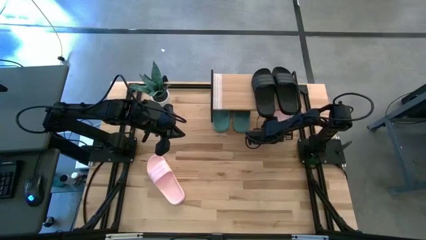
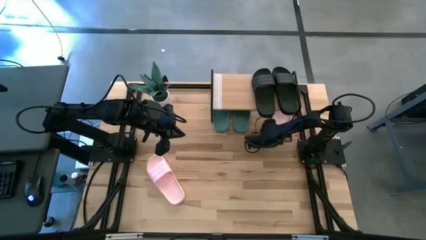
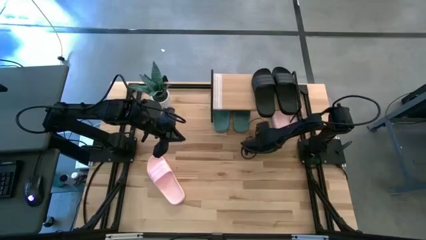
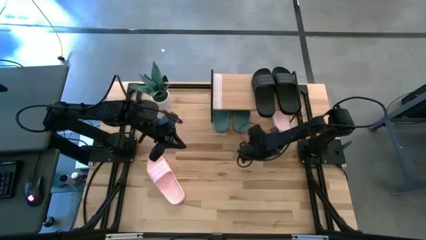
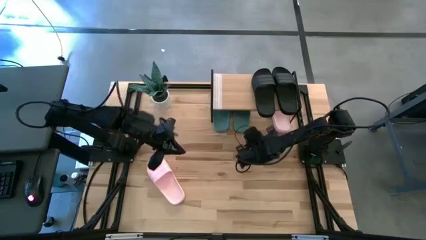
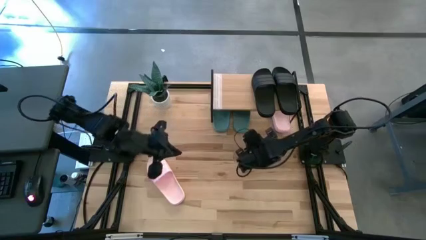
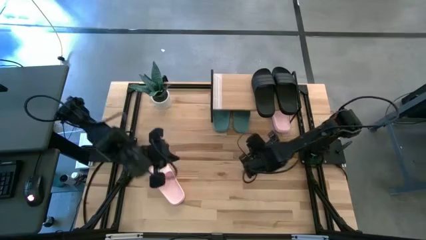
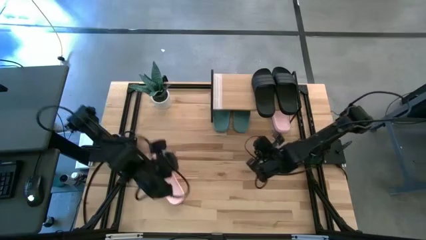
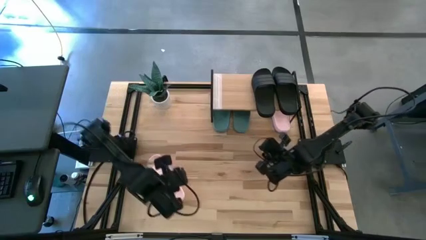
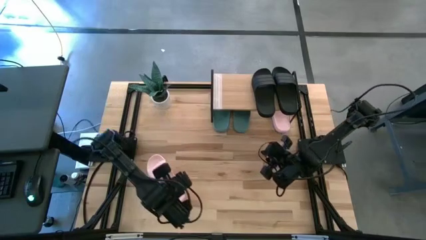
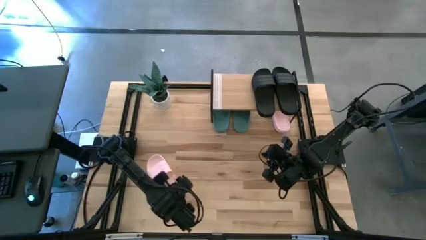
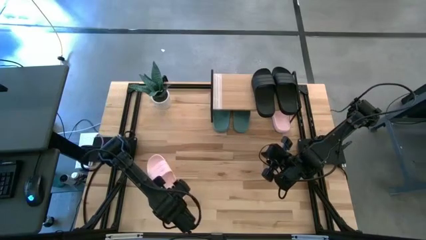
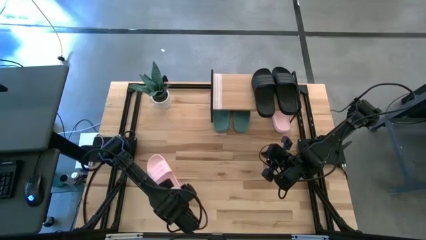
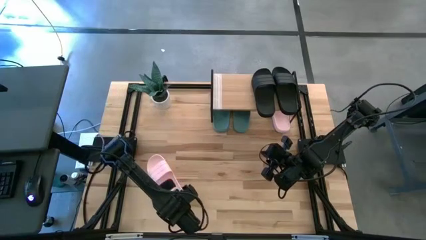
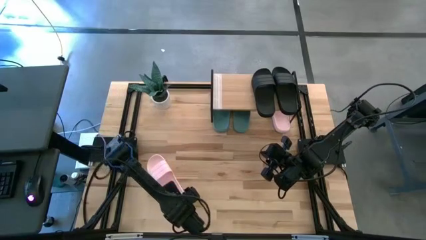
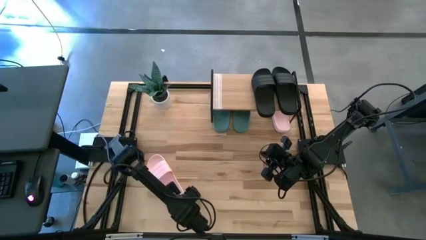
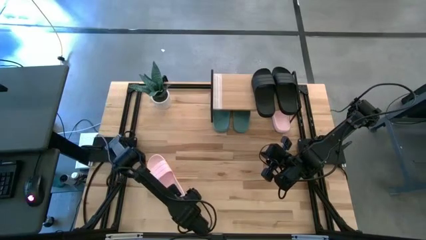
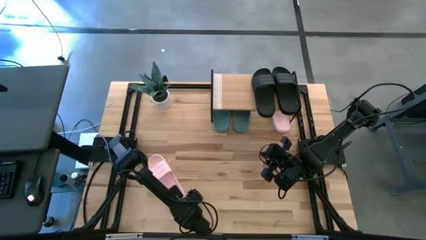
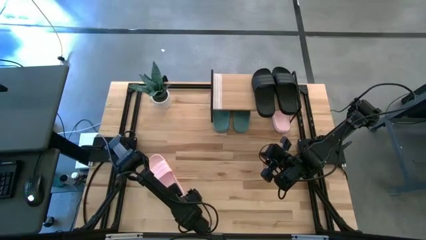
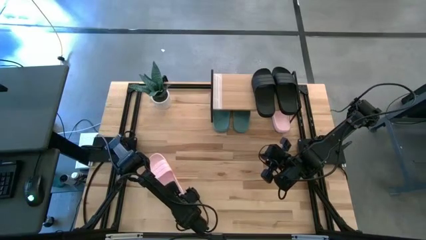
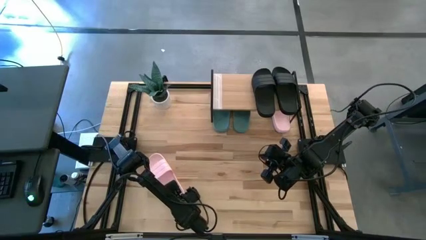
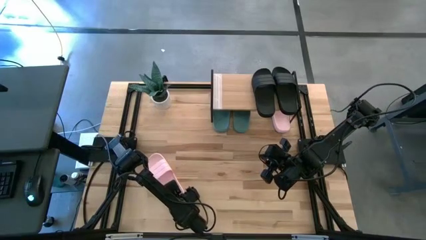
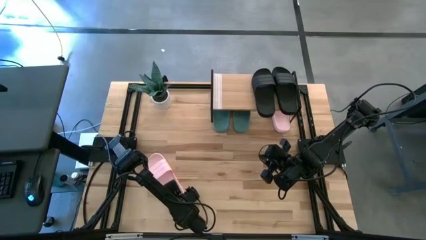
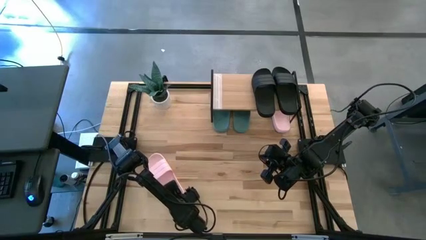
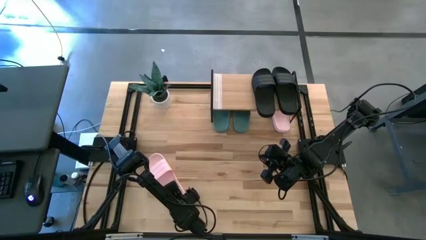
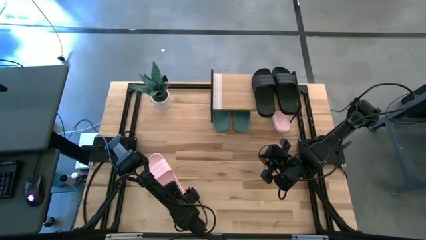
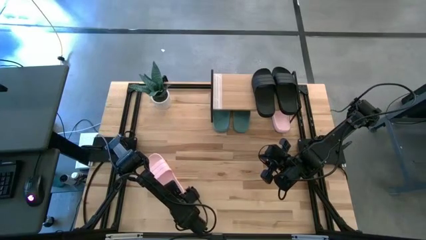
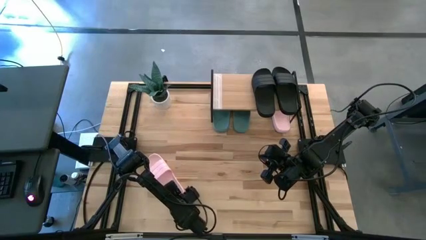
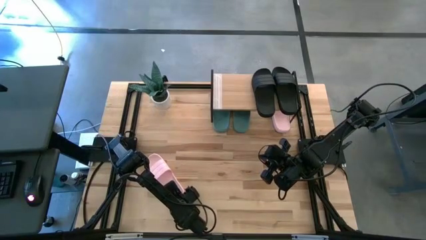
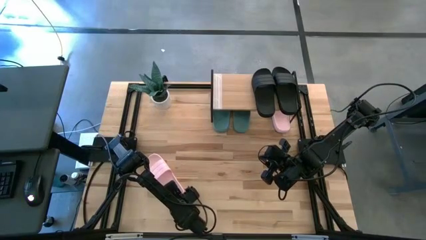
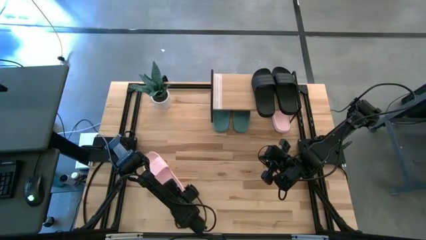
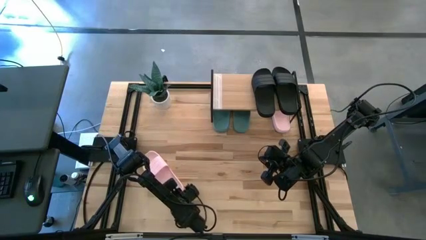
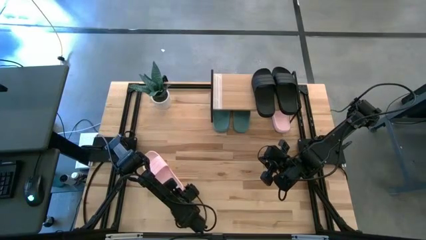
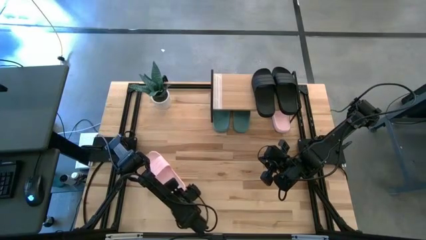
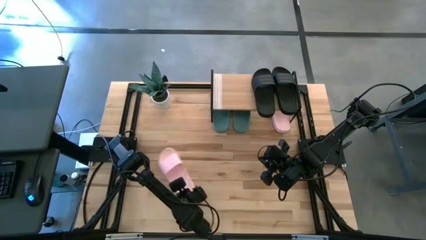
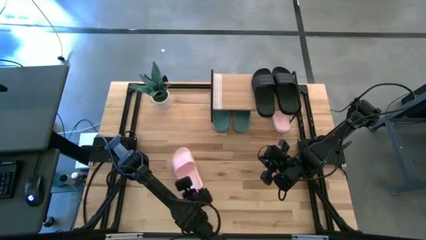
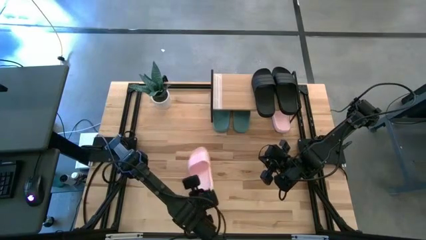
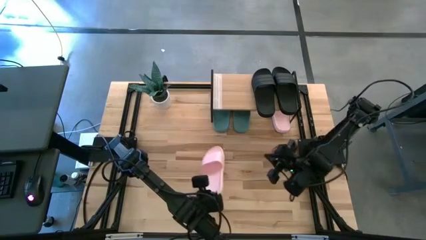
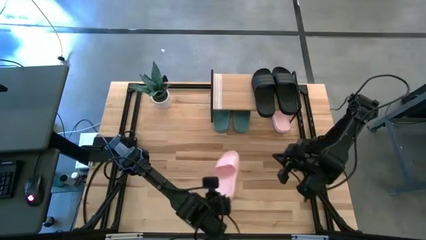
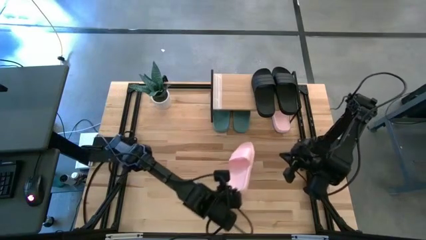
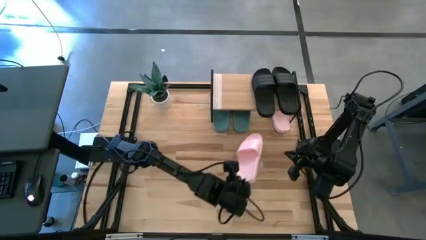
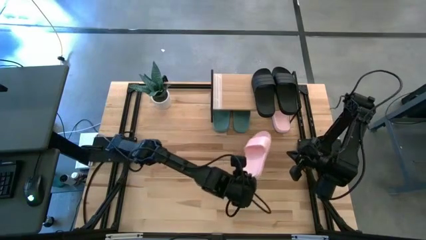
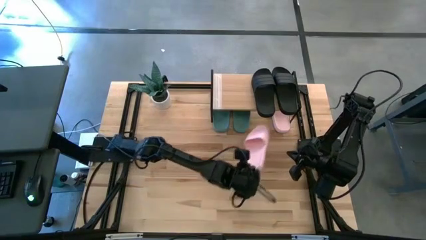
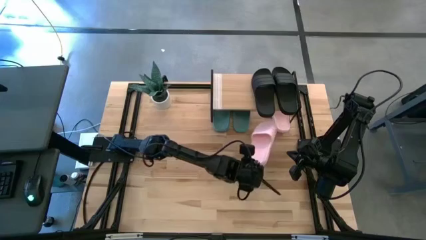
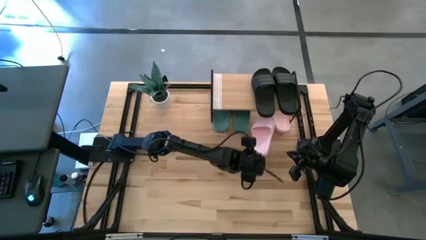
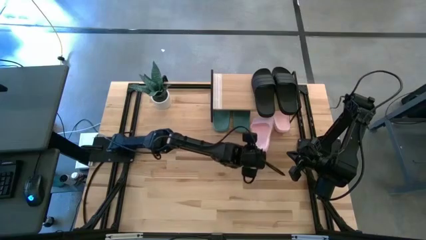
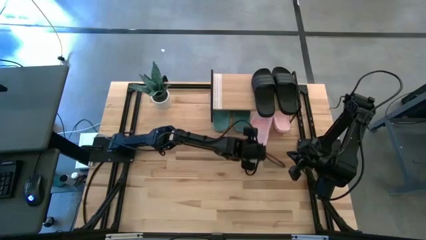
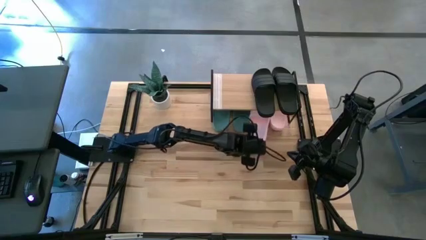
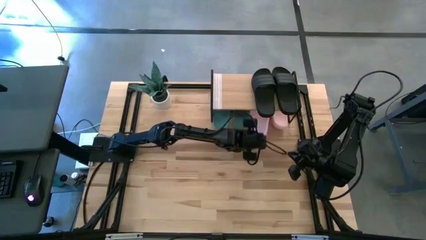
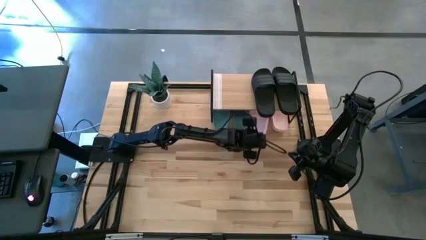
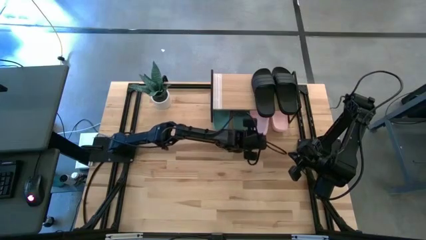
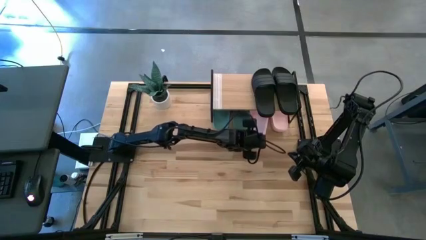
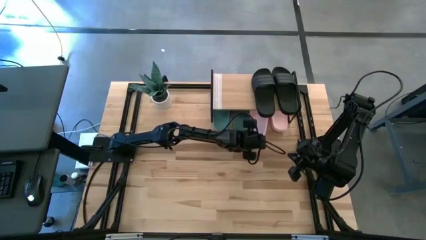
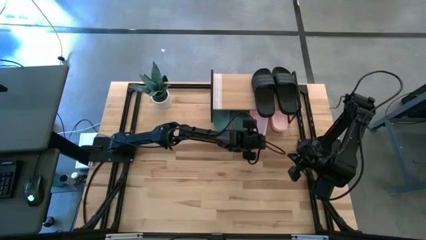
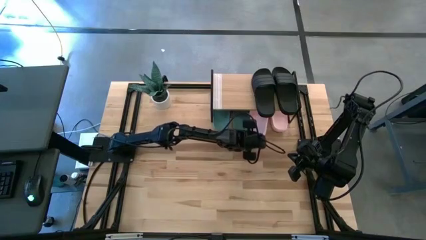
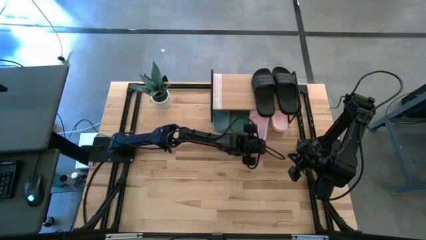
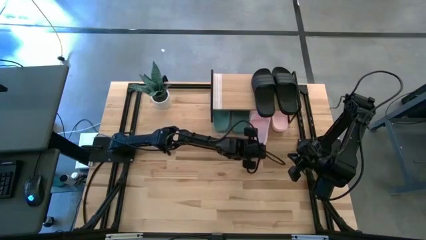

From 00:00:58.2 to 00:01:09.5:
Task: Pick and place slides into the shelf
Move the pink slipper under the shelf

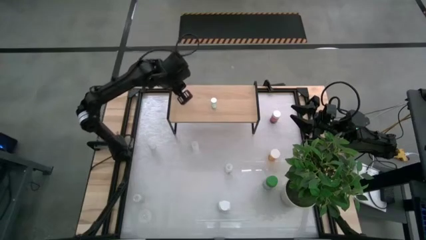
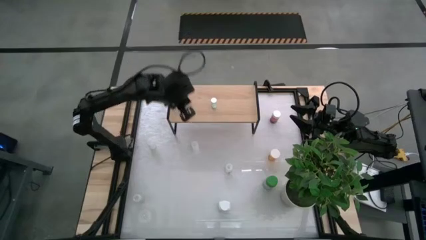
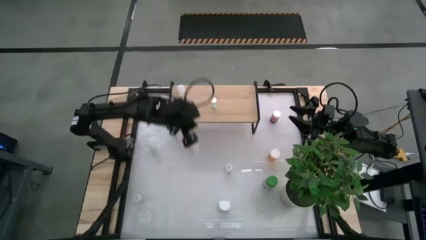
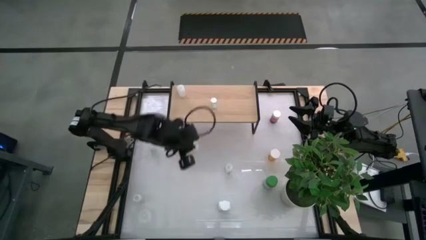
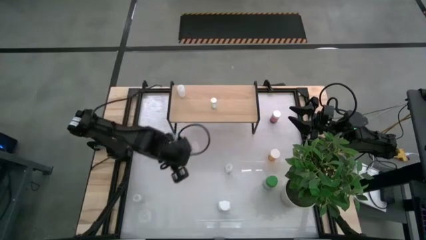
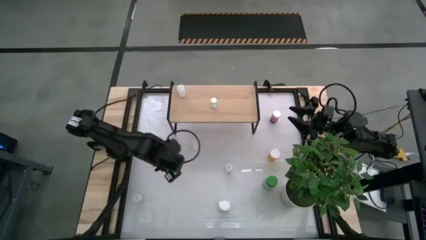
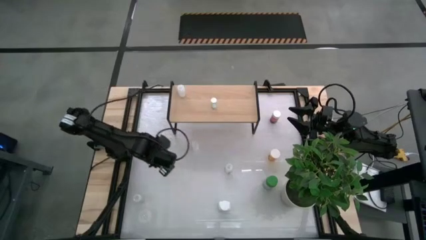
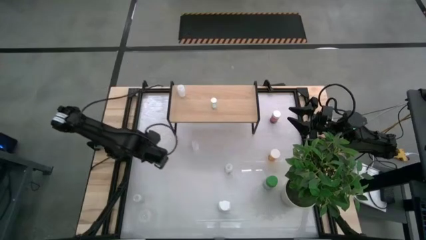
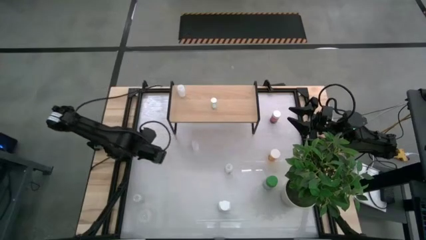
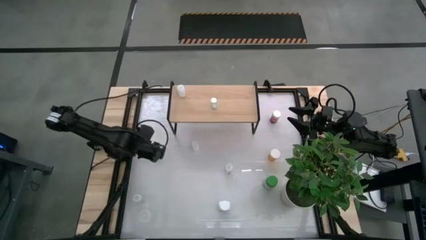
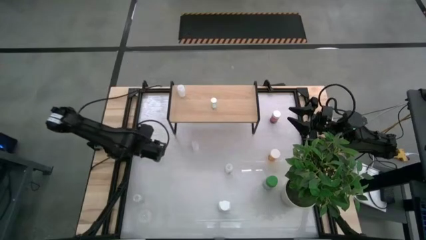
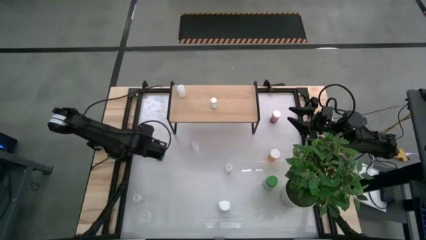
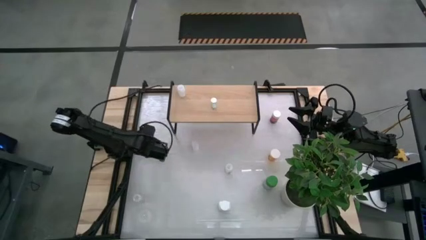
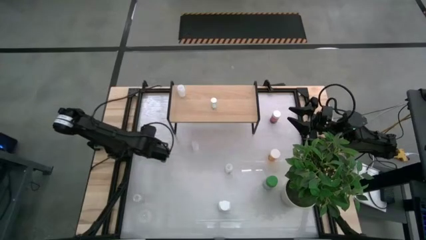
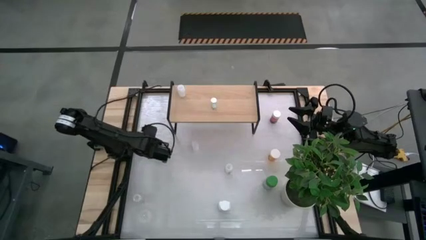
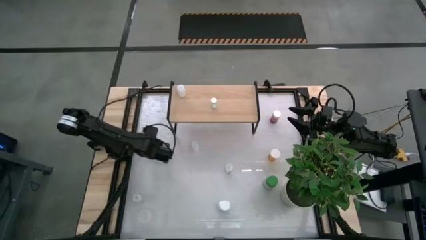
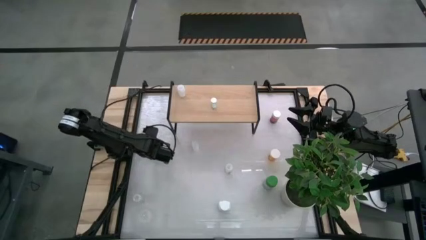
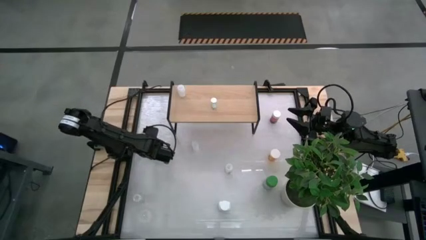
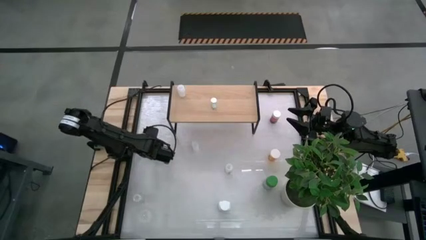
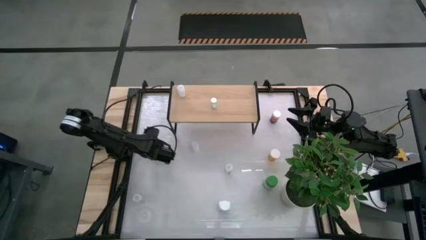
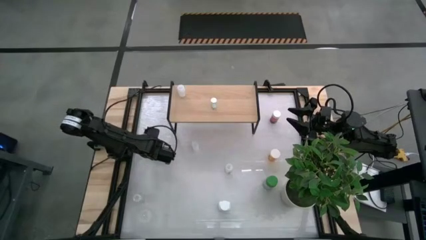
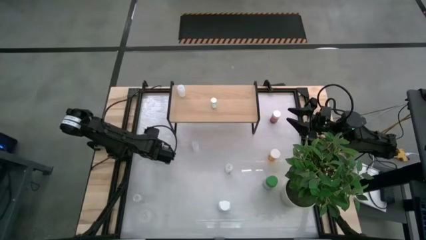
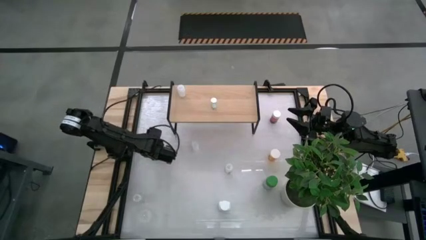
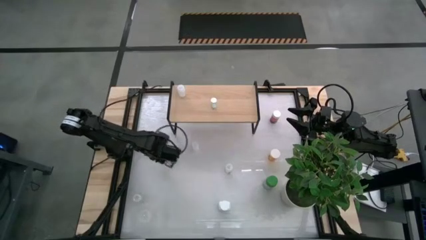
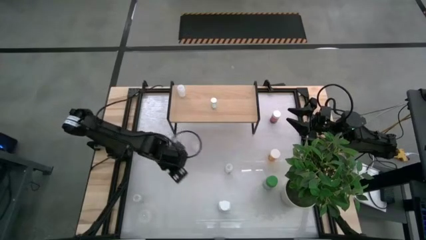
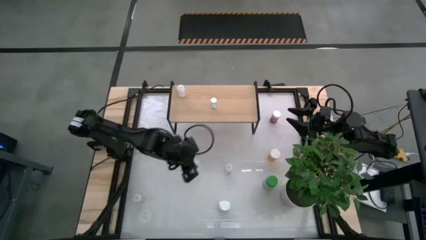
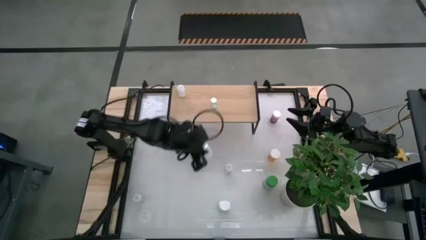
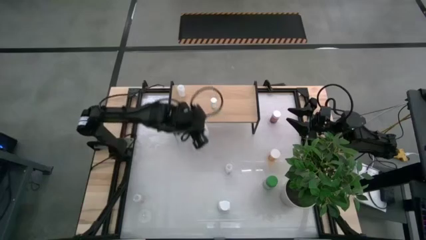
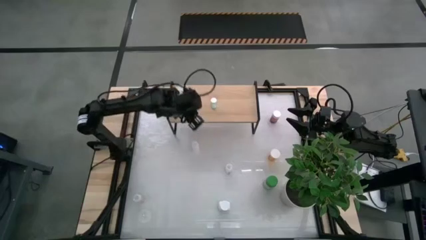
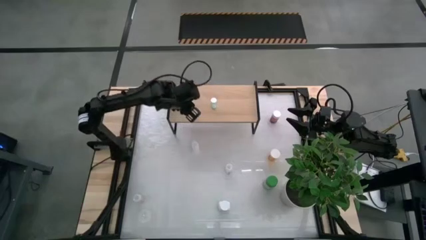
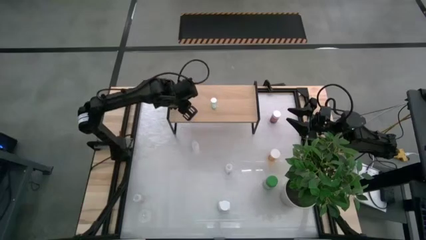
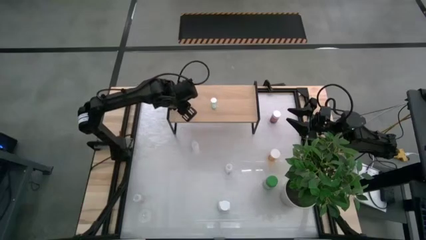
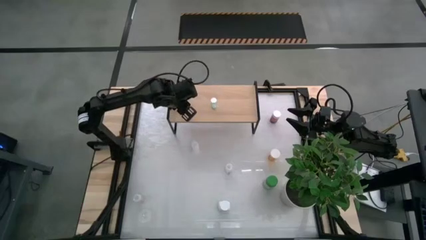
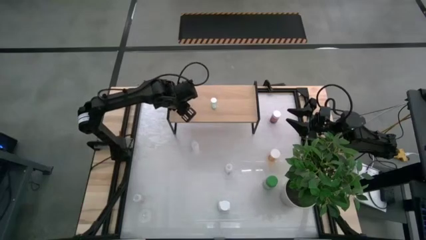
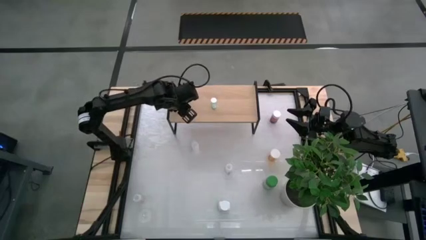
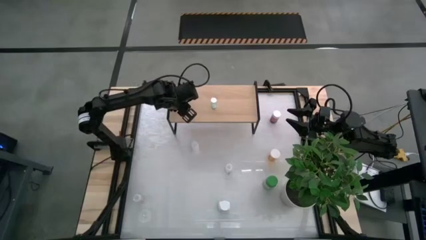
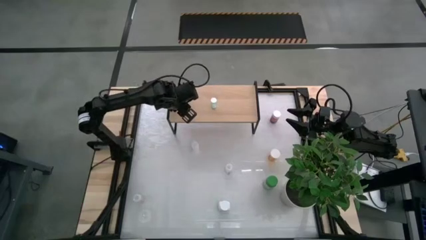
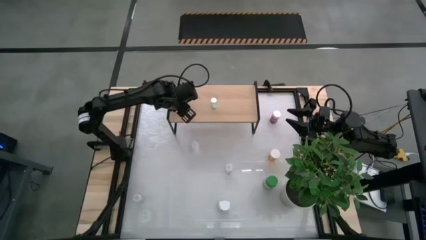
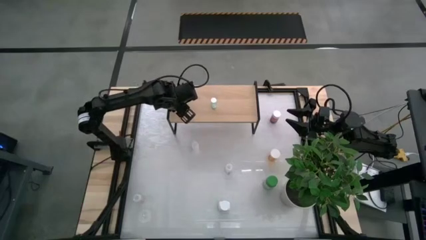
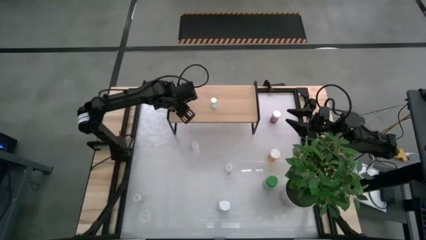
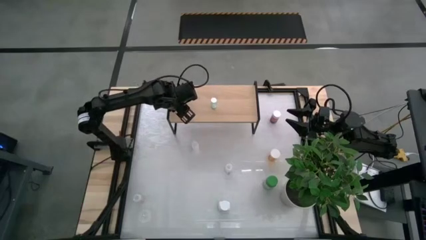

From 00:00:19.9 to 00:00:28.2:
Task: Pick and place medicine bottles onto shelf by color
Put the white pill bottle on the shelf
